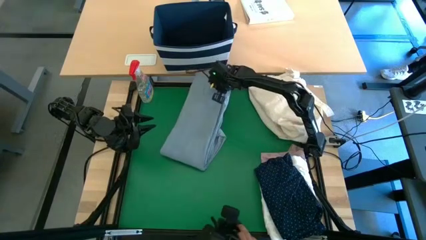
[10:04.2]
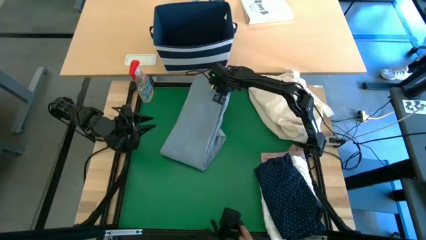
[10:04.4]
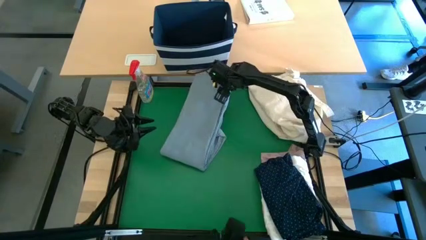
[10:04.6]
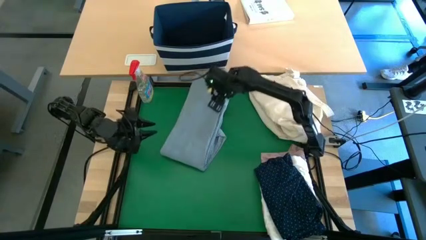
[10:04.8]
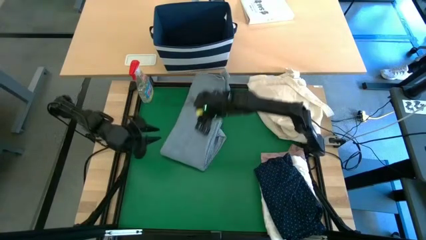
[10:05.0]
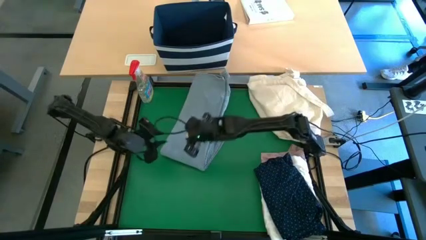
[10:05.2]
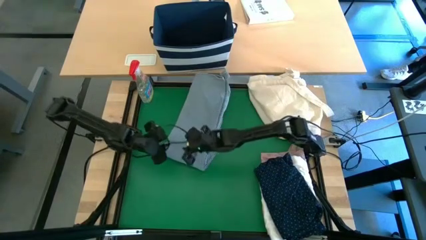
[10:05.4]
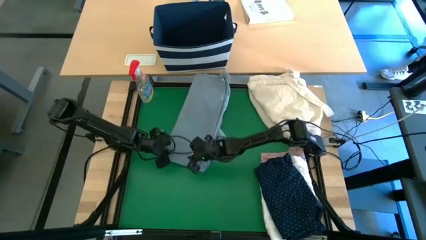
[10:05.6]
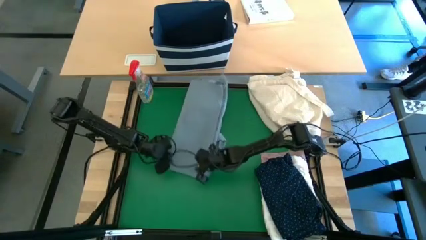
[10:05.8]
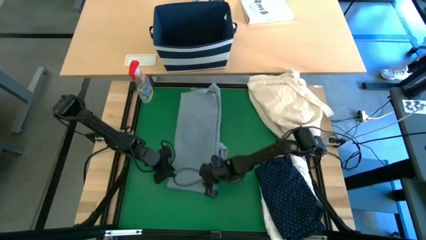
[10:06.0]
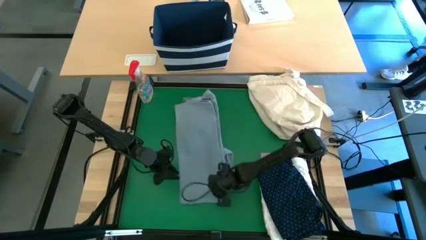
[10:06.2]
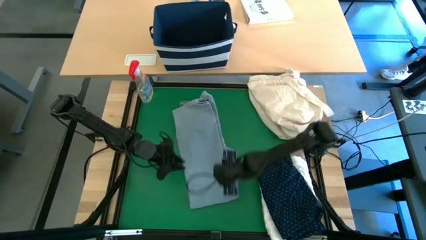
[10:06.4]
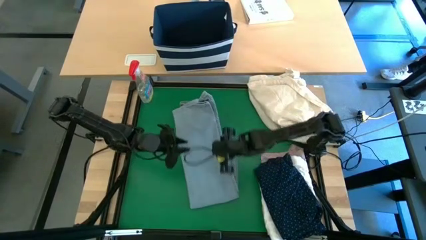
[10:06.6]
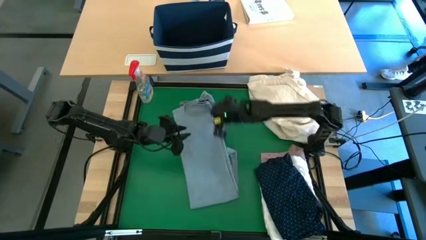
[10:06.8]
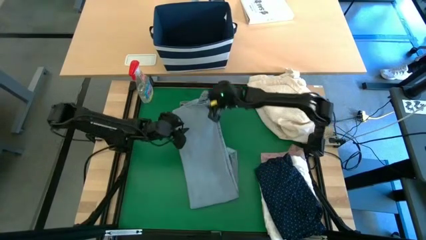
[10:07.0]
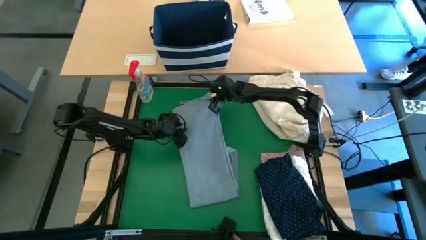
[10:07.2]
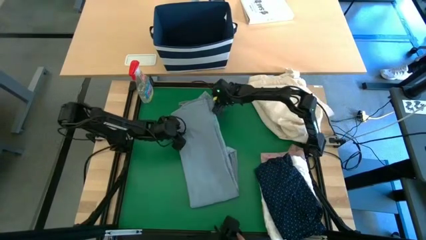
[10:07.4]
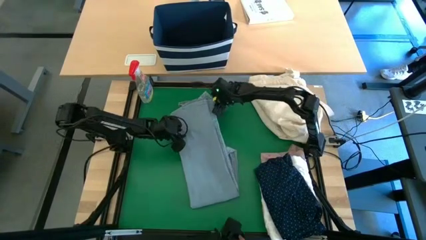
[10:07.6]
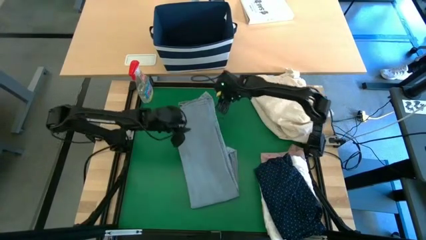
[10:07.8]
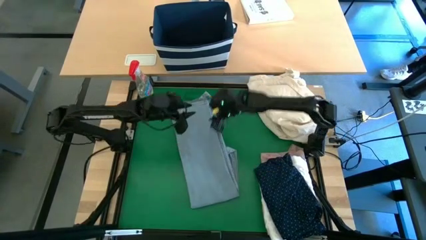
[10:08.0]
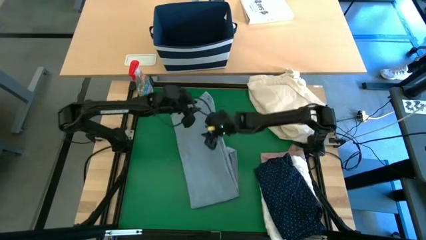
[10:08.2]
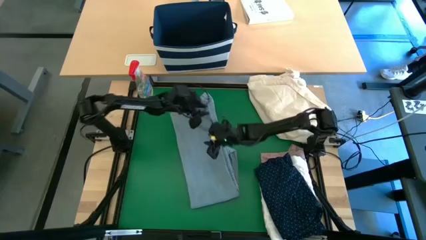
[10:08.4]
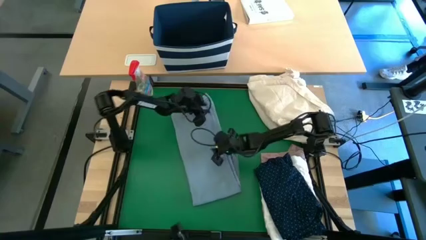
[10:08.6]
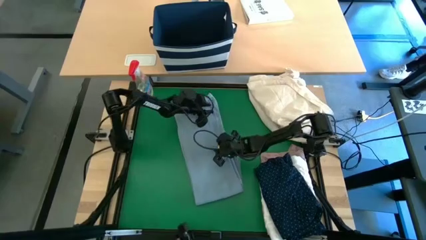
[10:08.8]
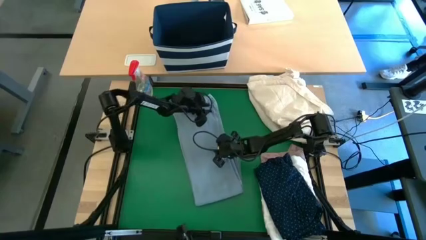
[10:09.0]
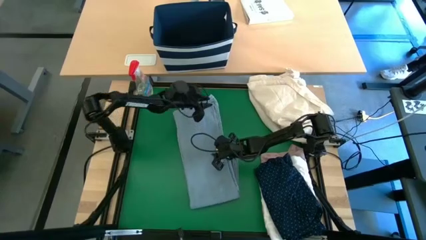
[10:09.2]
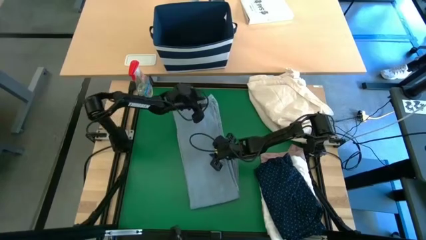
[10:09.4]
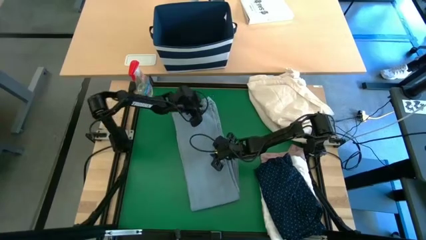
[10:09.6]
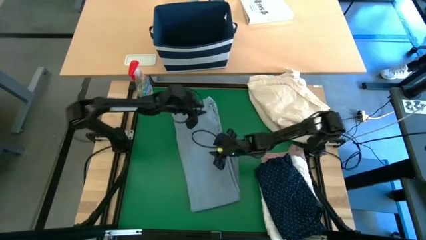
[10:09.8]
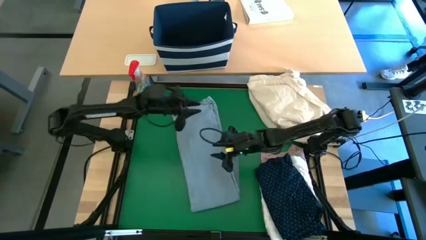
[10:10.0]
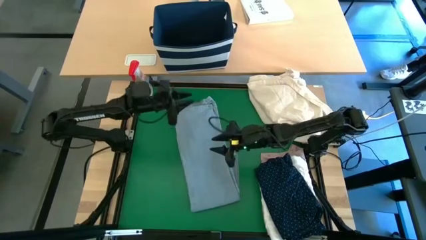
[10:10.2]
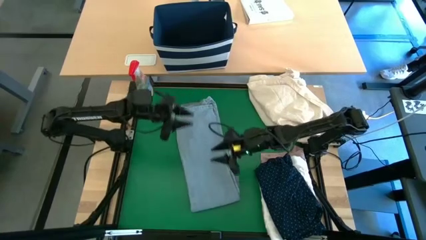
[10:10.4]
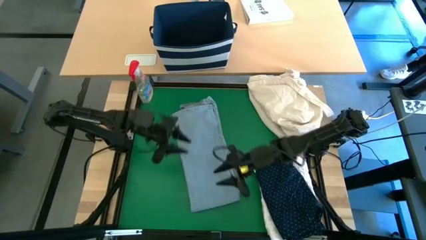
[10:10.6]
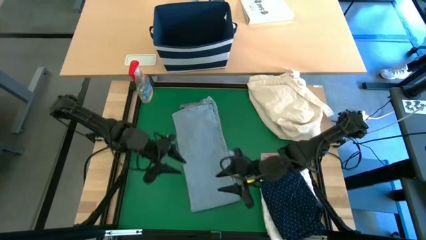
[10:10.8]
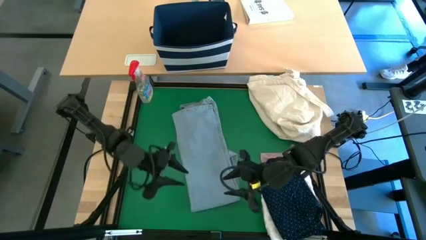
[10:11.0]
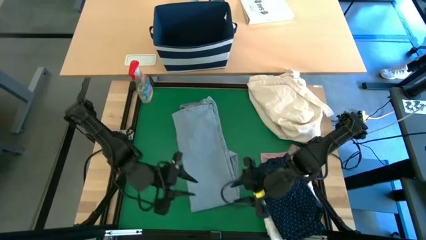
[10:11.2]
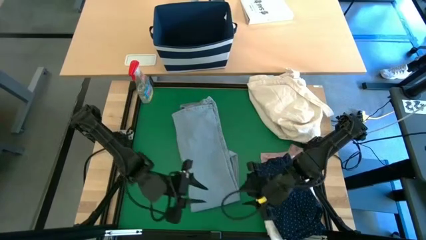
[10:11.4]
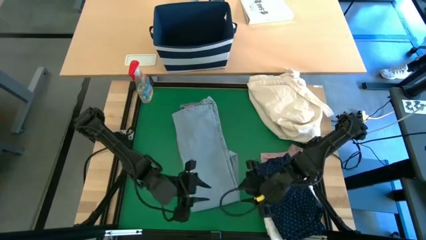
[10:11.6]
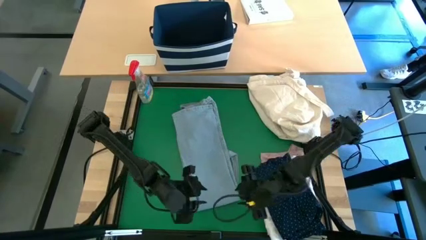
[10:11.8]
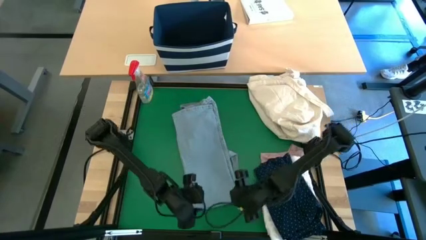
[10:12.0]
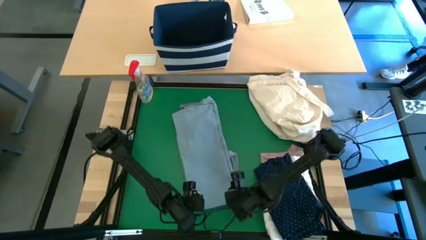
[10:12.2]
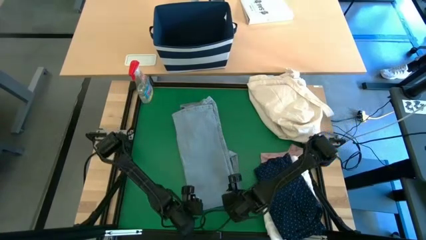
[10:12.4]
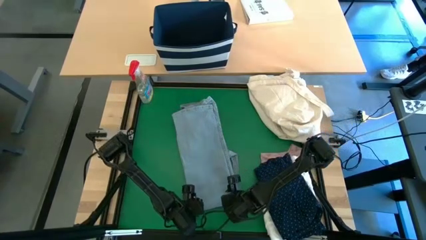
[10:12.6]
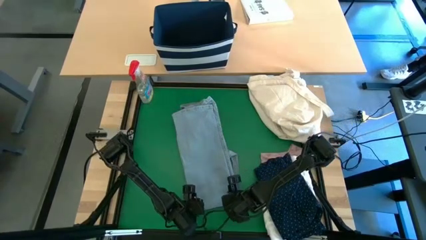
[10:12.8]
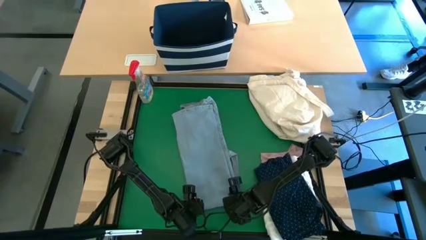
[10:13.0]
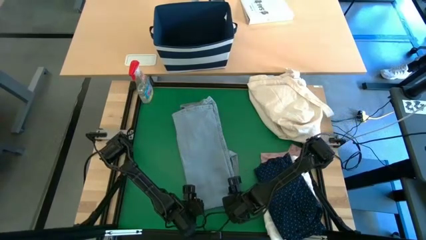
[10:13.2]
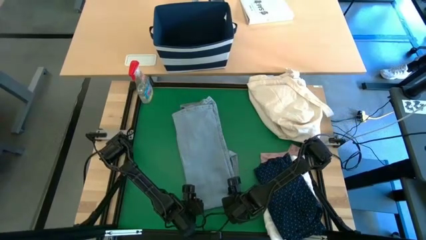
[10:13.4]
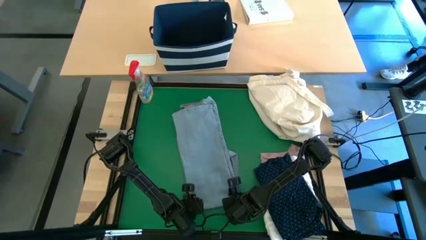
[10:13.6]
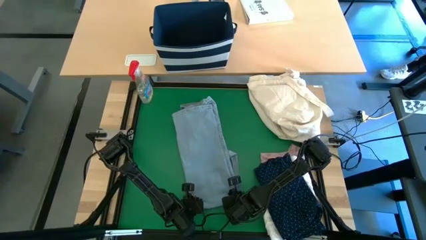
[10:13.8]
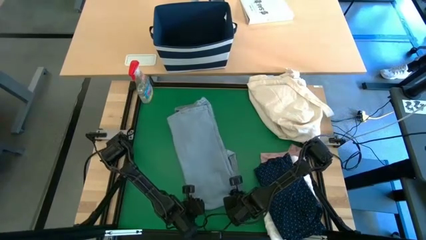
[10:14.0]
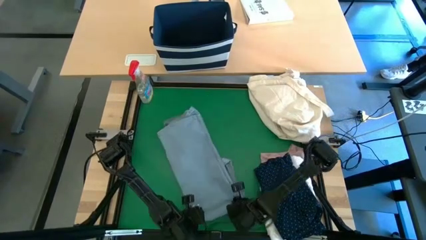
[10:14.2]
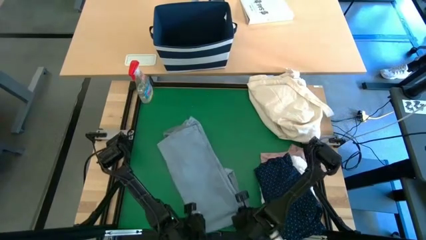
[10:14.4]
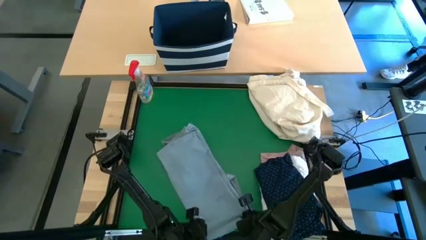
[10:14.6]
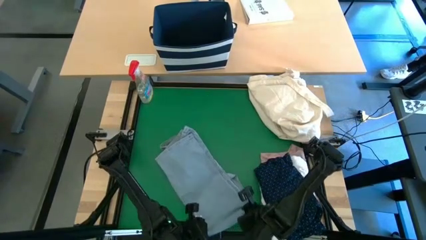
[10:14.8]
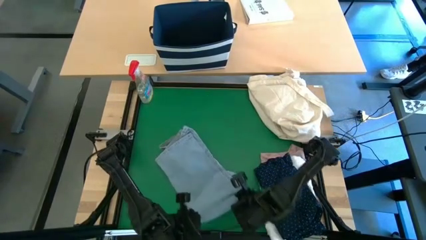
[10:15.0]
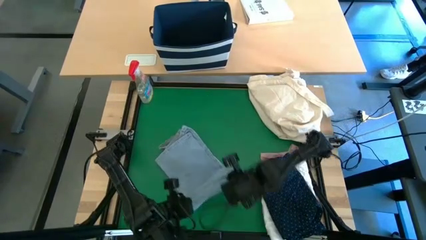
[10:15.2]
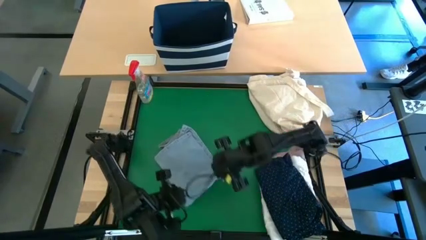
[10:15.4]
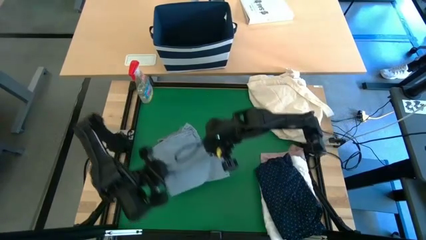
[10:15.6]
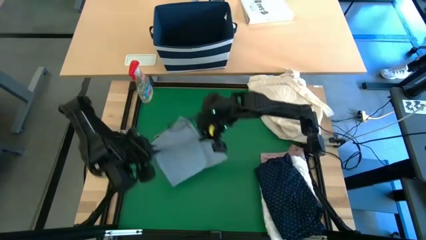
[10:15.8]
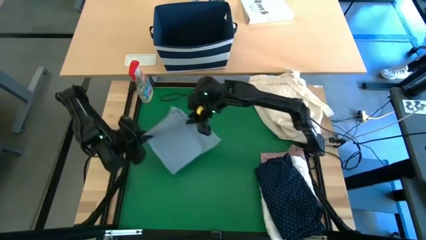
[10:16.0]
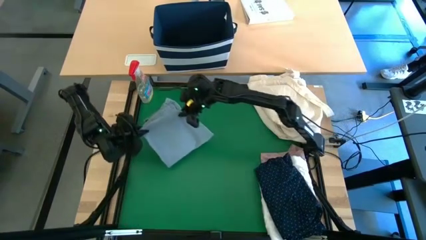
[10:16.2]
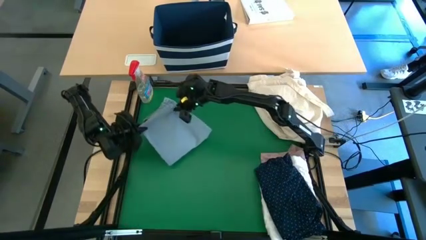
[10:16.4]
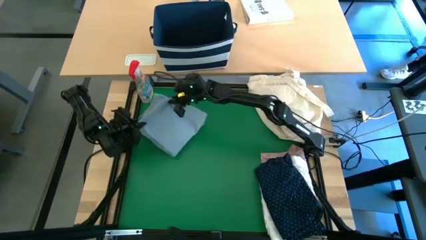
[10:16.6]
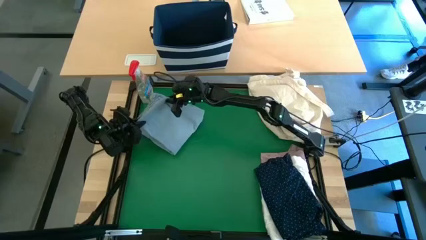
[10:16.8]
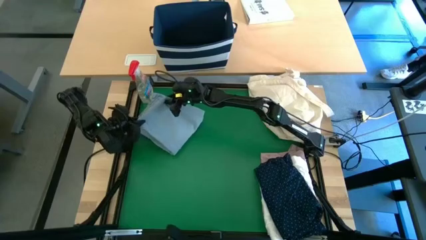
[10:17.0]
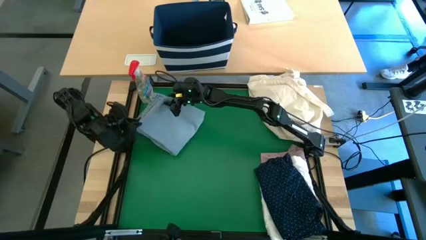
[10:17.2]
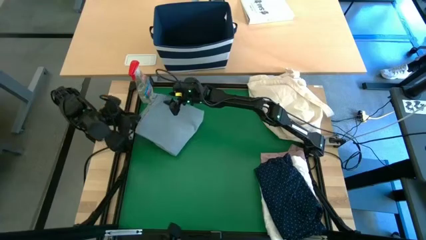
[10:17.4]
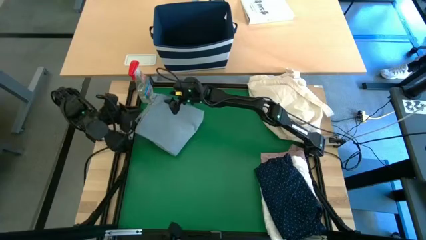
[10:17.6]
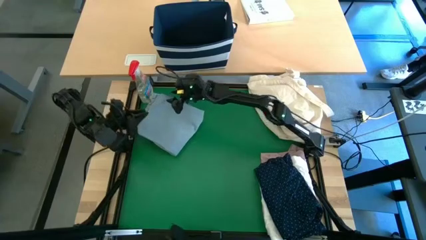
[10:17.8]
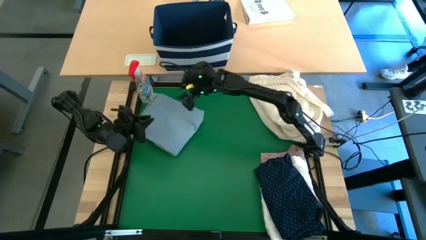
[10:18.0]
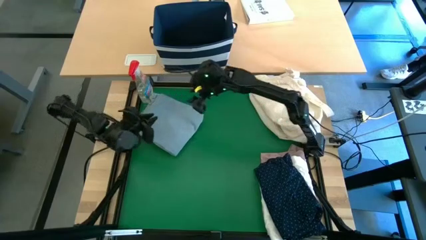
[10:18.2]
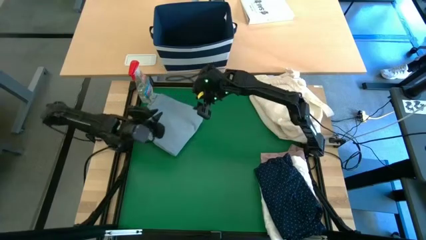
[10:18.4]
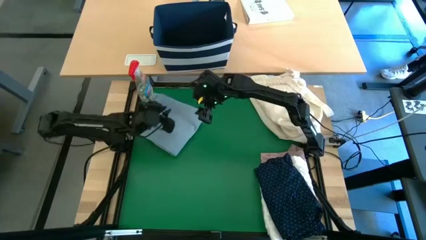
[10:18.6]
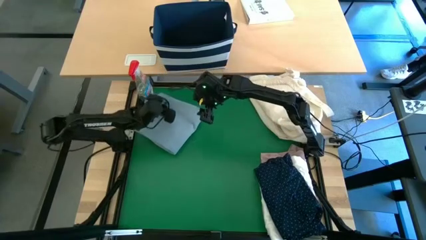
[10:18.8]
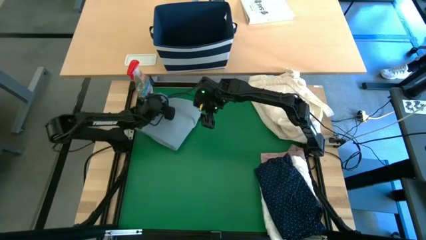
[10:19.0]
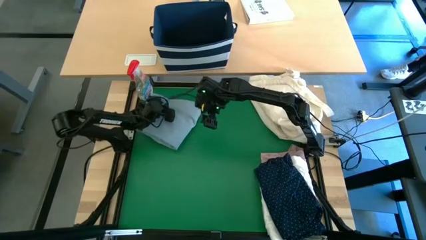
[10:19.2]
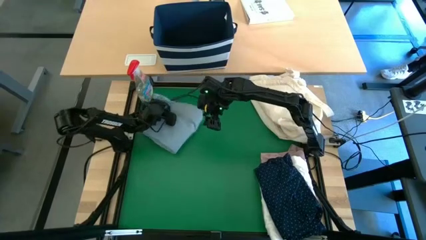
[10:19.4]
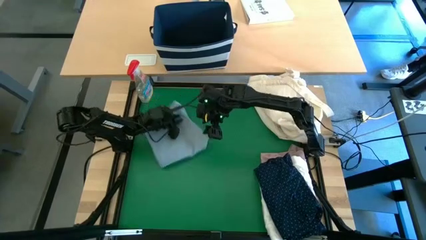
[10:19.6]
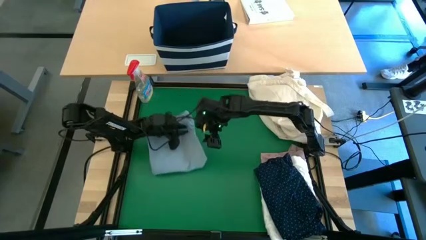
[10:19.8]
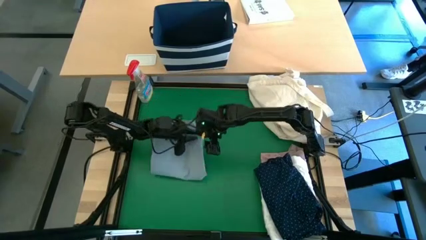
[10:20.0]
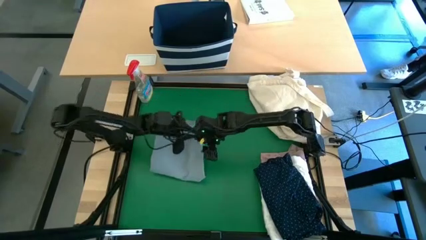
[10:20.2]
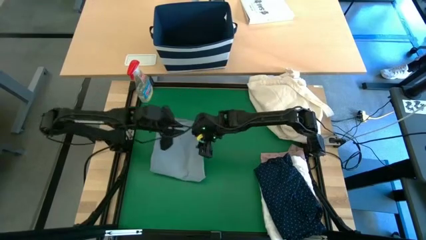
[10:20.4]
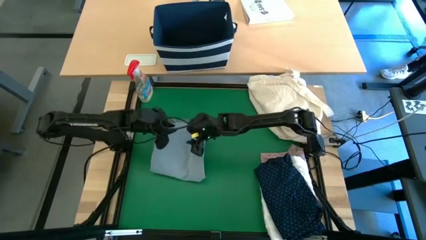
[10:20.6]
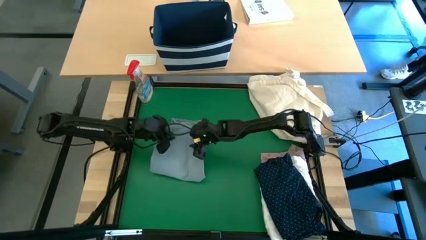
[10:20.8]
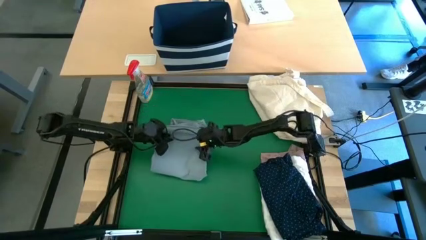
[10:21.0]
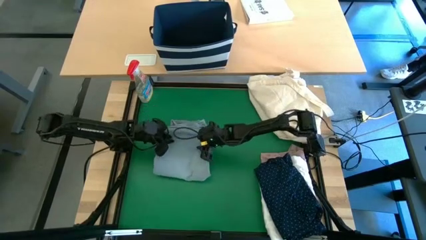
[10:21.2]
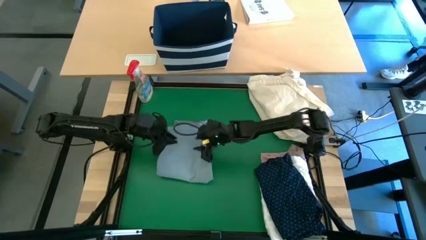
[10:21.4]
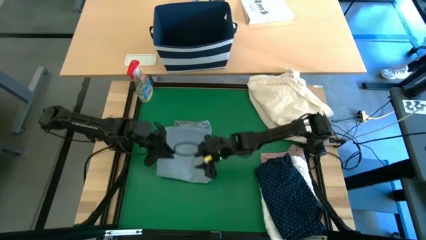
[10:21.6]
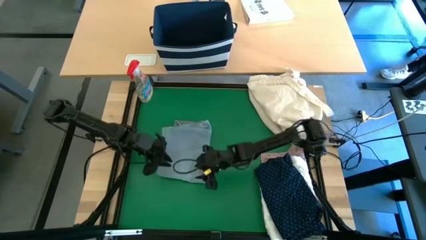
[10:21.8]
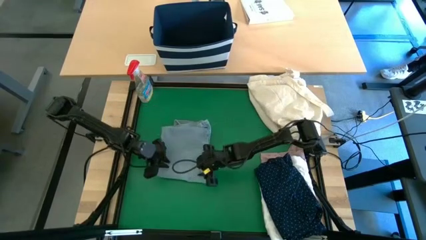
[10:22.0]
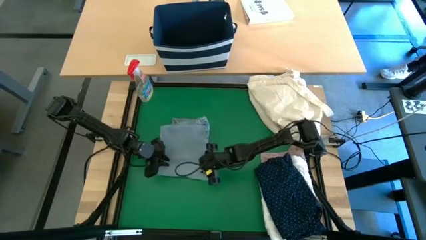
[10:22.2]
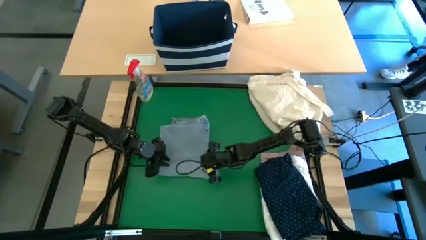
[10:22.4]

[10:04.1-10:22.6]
Task: Fold laundry
Fold the blue jeans
